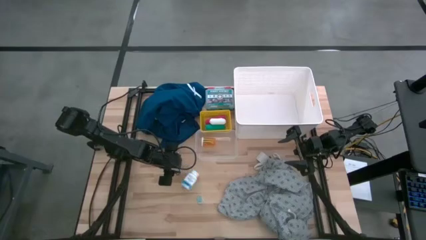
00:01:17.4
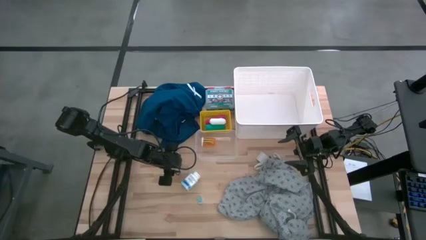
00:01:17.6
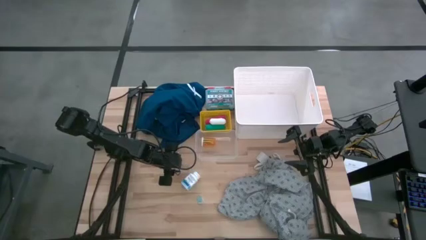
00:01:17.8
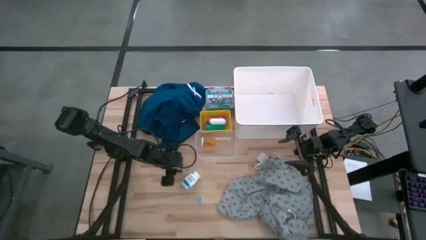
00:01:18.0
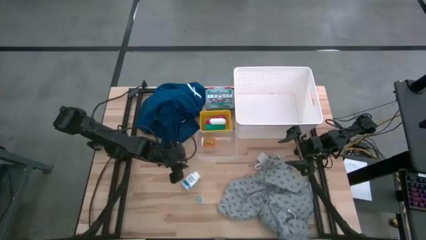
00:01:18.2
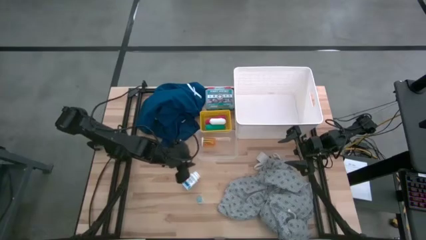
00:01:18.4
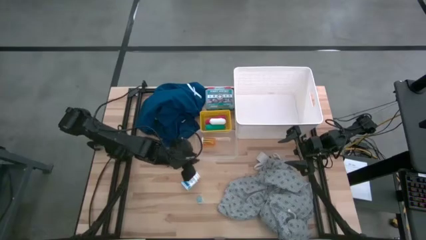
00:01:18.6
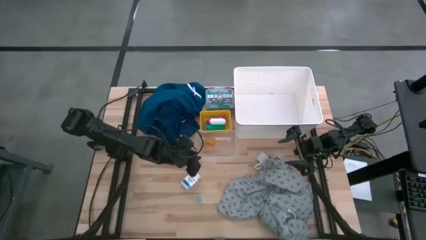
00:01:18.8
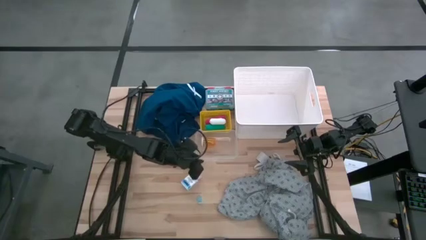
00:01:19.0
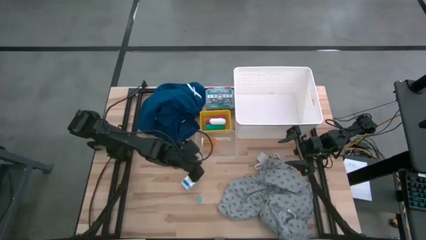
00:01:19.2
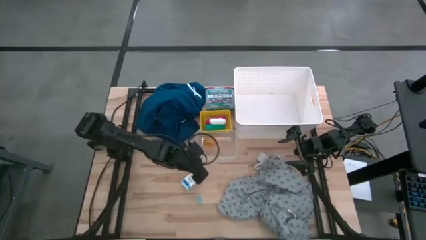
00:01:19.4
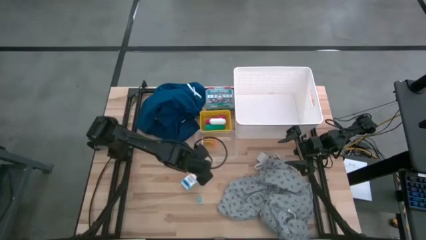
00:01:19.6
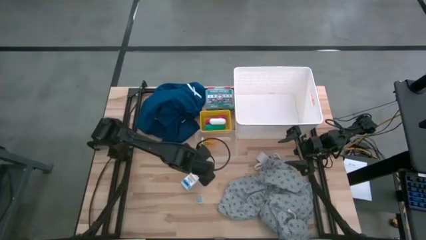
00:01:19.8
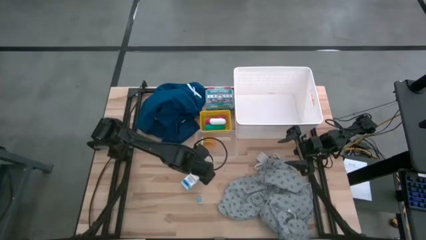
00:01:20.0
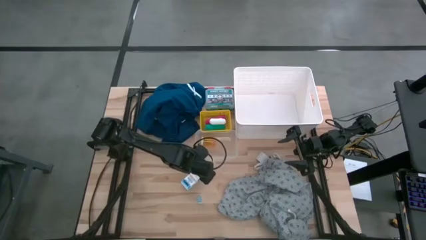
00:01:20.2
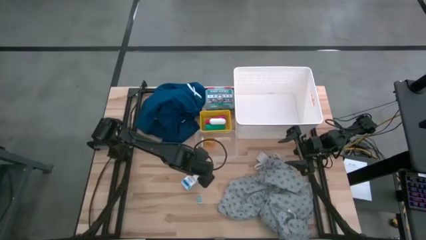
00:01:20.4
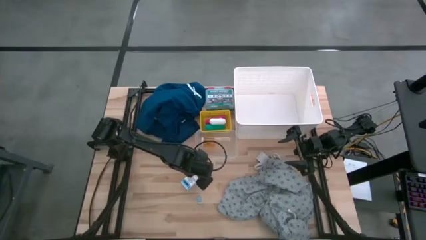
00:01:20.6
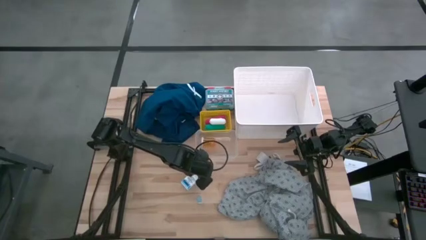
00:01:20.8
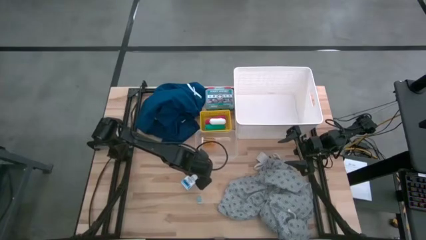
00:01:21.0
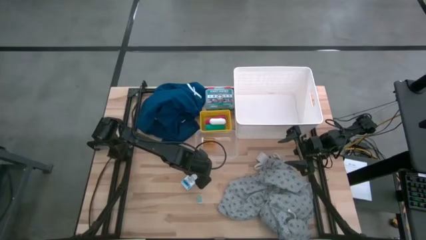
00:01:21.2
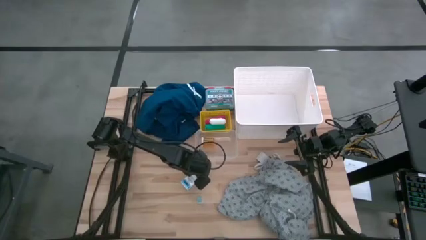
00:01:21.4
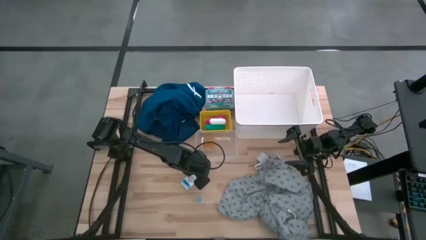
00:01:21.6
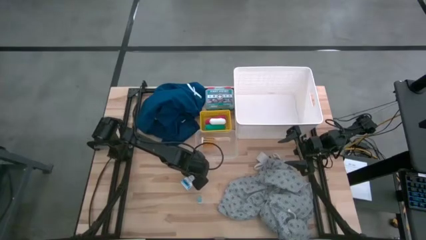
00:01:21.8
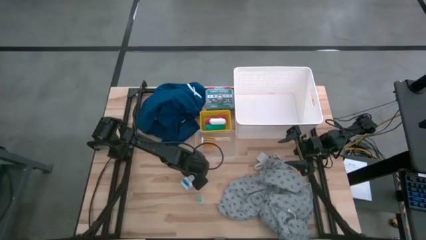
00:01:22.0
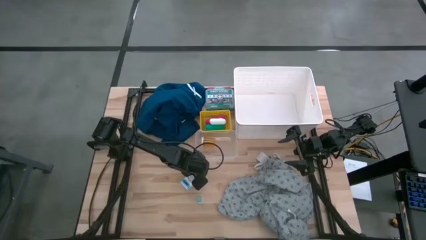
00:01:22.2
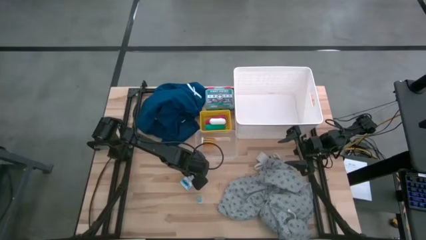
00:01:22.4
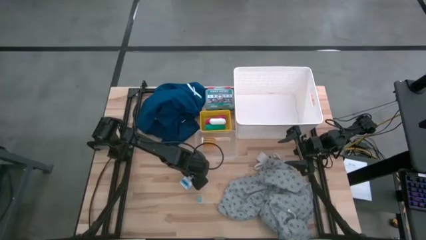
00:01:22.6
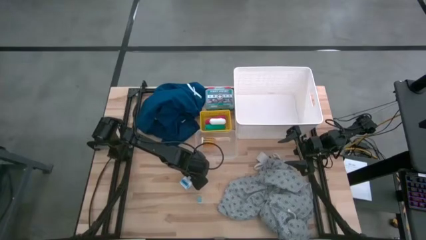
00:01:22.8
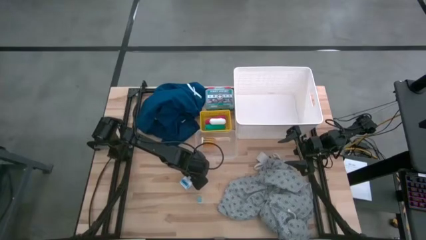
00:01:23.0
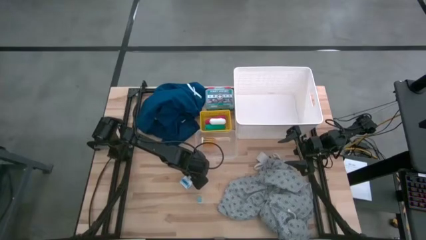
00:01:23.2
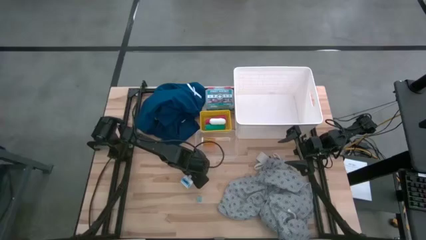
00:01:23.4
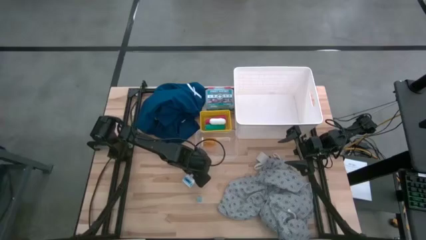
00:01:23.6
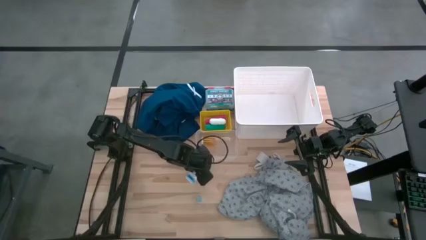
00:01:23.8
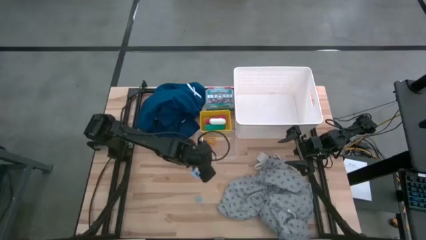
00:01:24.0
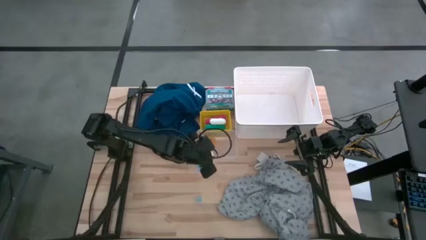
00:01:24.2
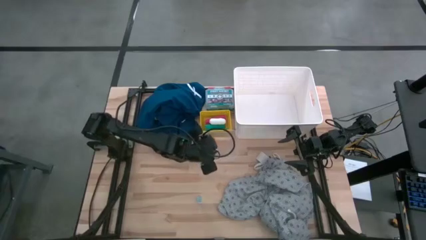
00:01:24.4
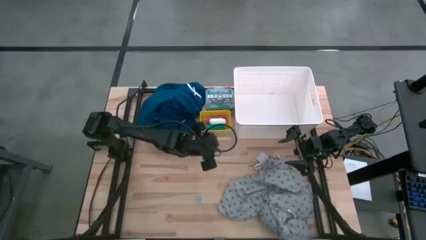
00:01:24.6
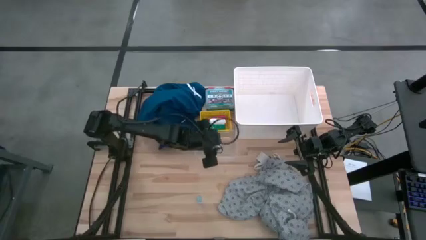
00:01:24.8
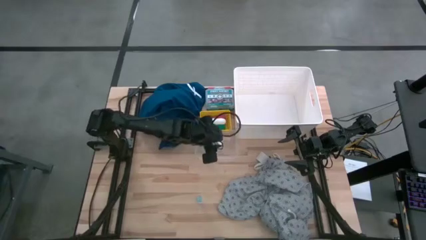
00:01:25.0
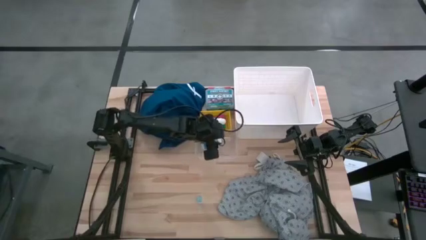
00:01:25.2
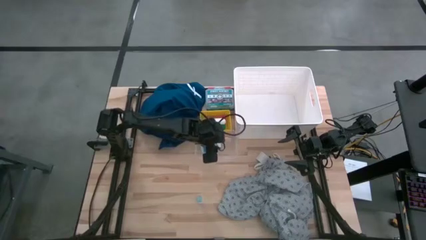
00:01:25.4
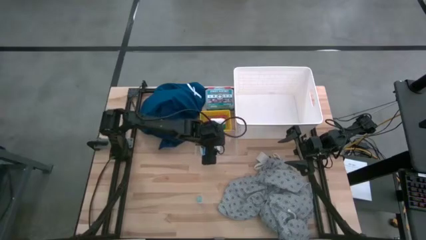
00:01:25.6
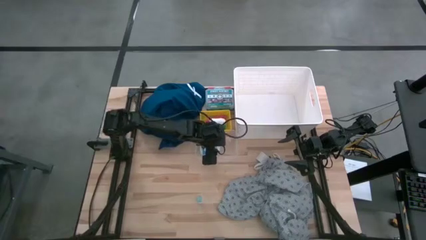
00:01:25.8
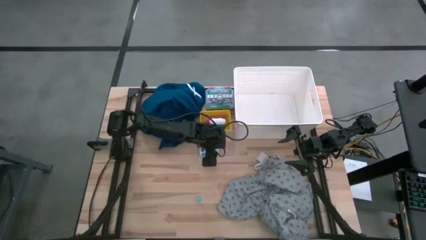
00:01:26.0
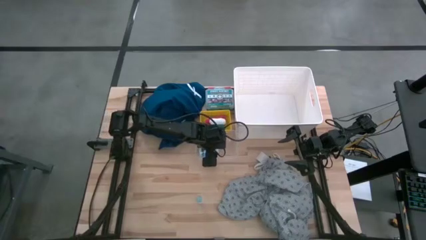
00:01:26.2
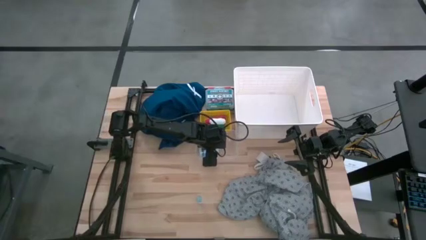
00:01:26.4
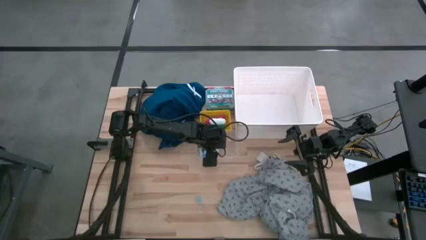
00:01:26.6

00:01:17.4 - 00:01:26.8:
Task: Pick & Place Medicine items
Put the white medicine bottle into the transparent bin
